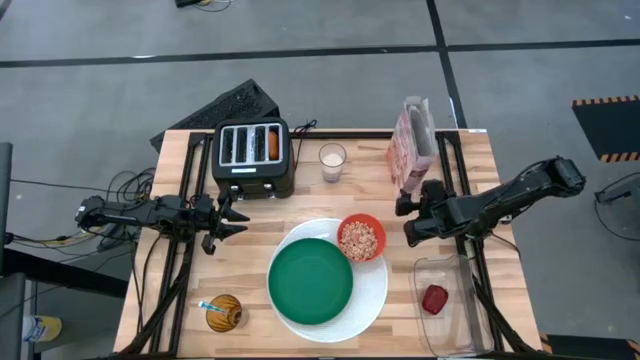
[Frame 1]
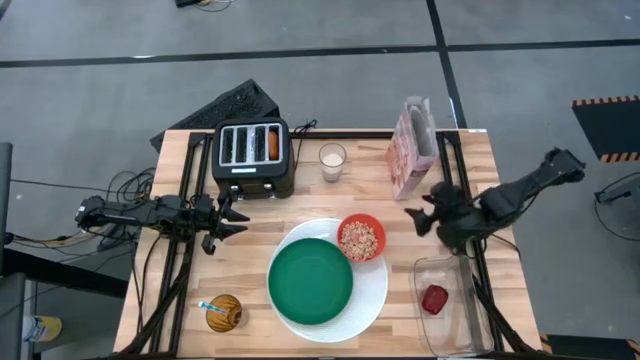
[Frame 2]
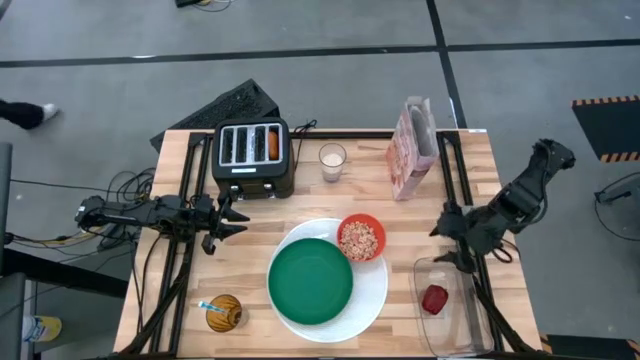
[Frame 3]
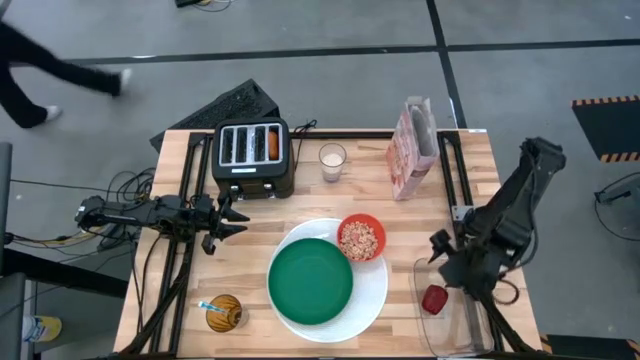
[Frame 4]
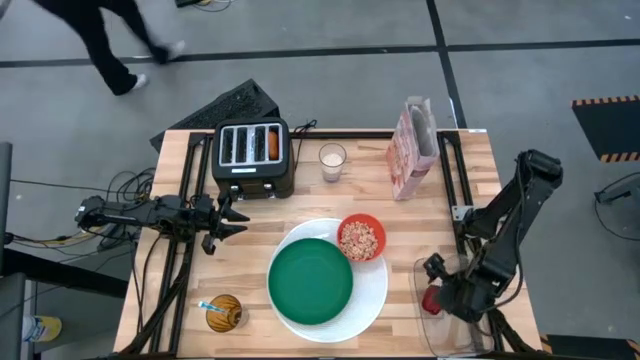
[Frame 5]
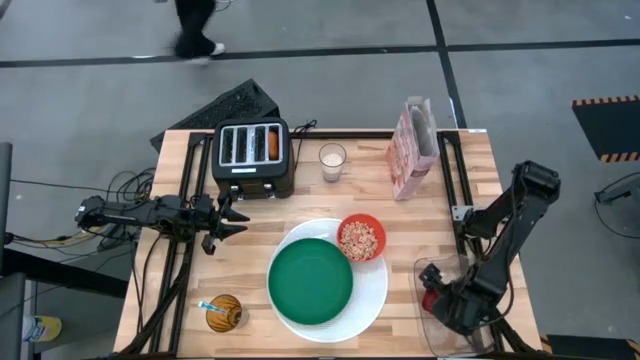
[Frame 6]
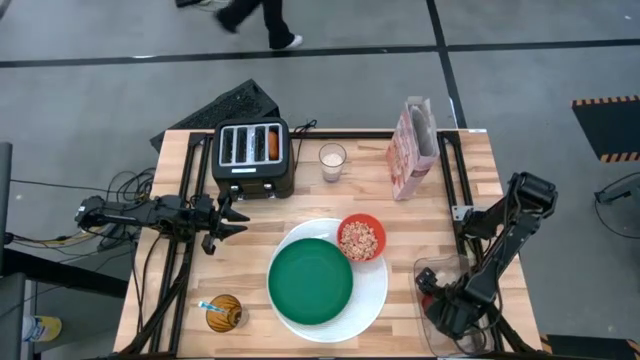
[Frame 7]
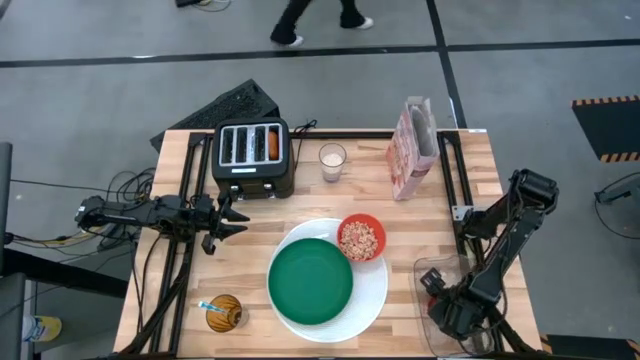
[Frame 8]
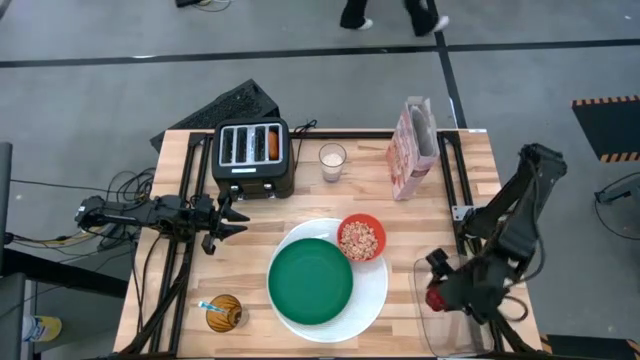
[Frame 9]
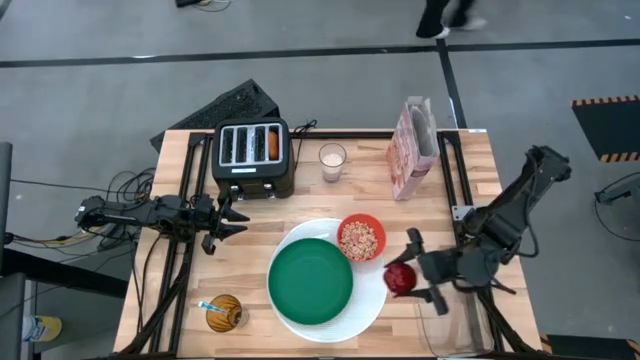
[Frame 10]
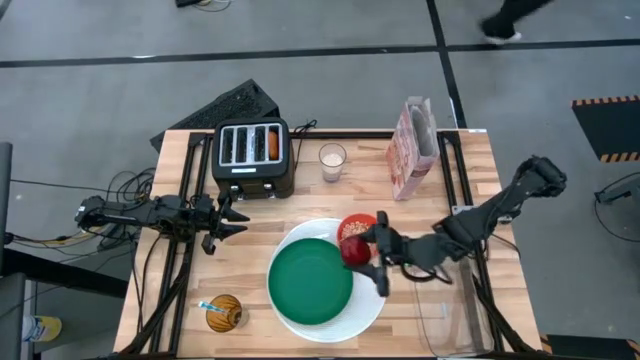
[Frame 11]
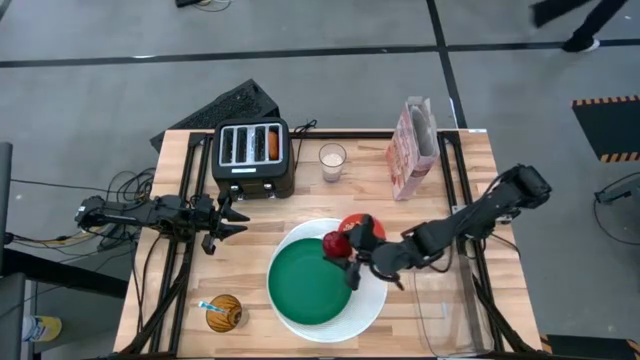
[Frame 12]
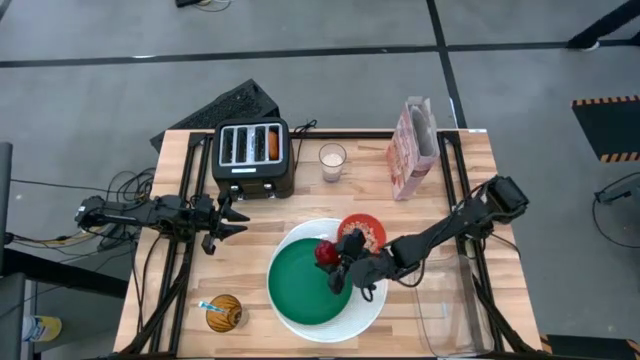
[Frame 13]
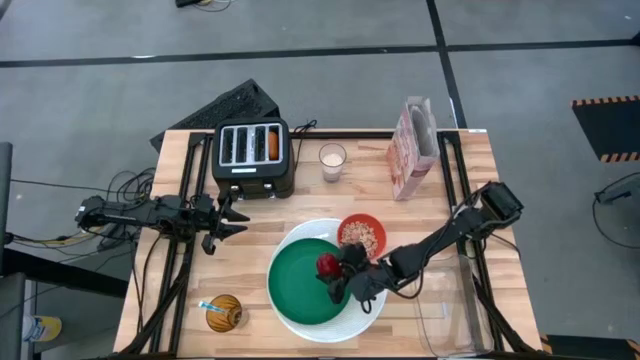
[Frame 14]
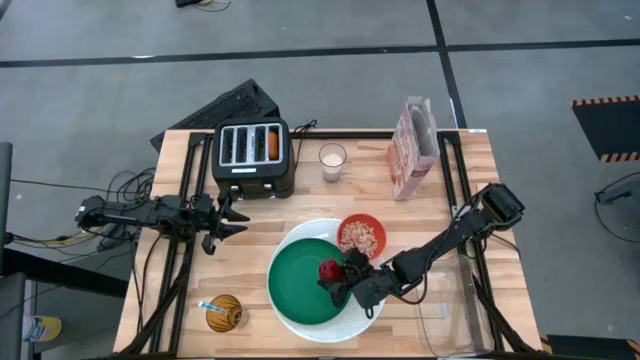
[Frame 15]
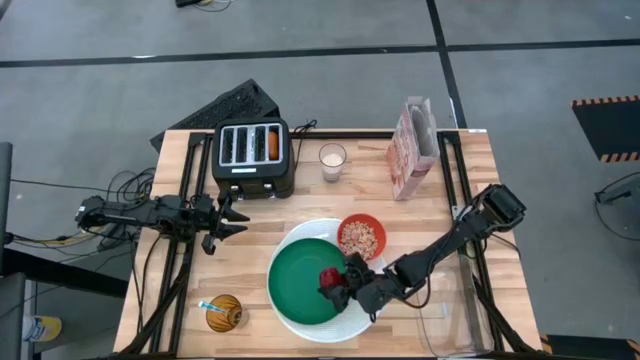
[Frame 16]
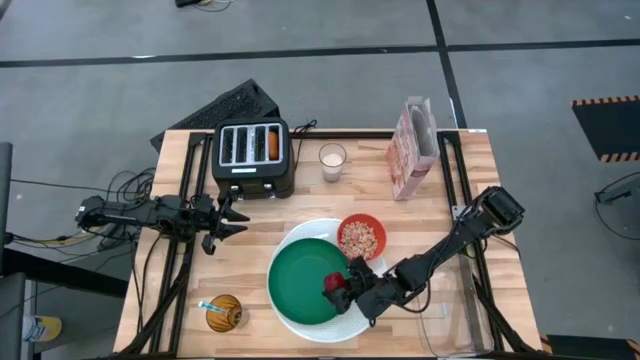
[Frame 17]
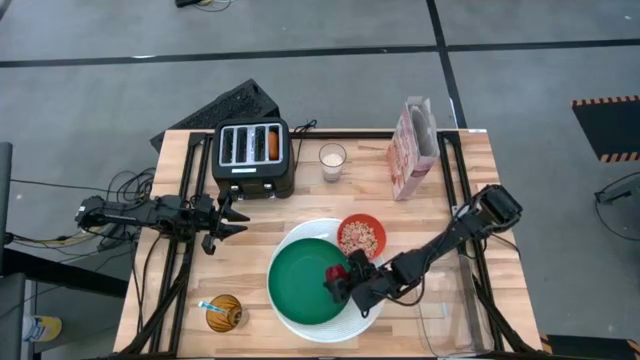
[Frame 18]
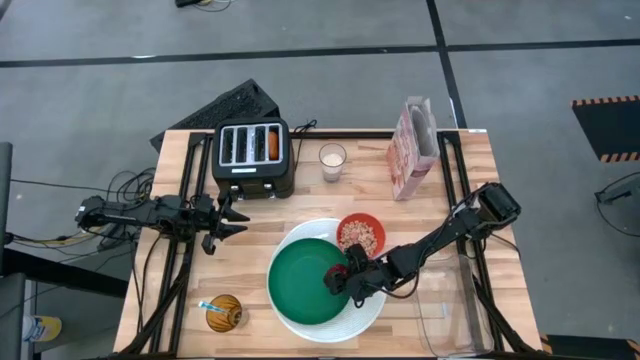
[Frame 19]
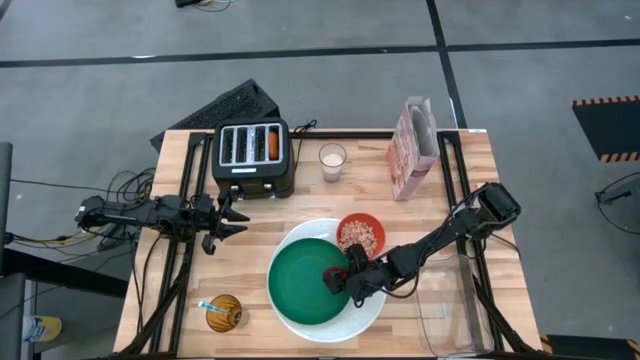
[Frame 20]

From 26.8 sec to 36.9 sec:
Task: Arrange a breakfast setting
Put the red apple into the green plate

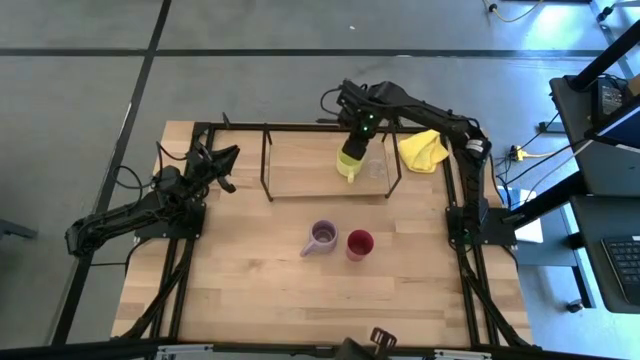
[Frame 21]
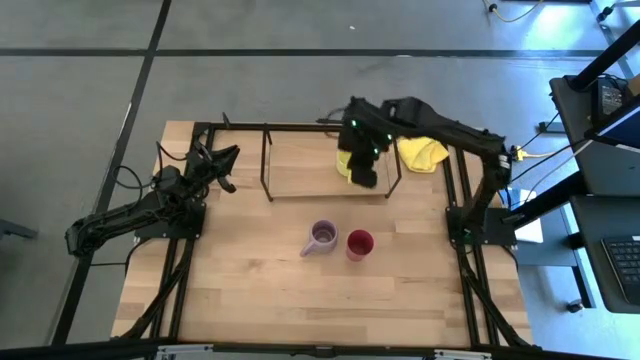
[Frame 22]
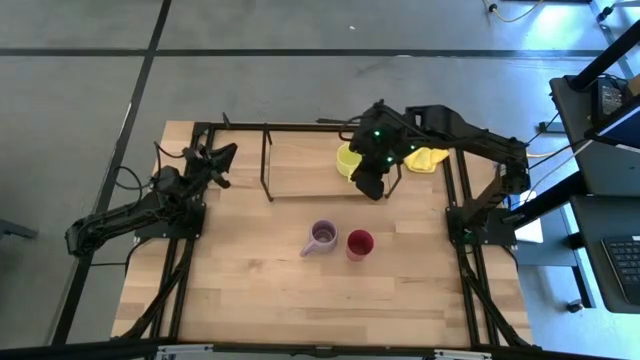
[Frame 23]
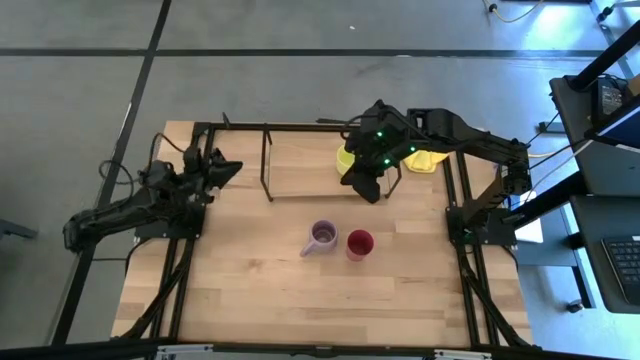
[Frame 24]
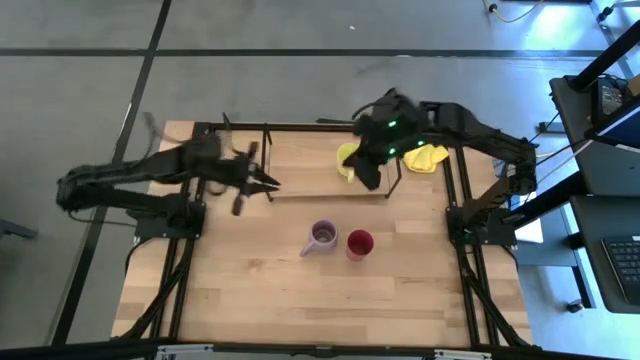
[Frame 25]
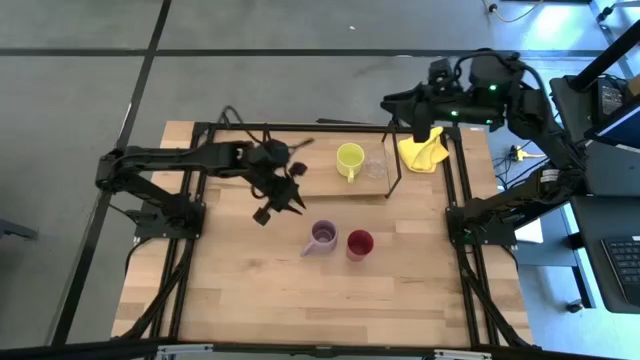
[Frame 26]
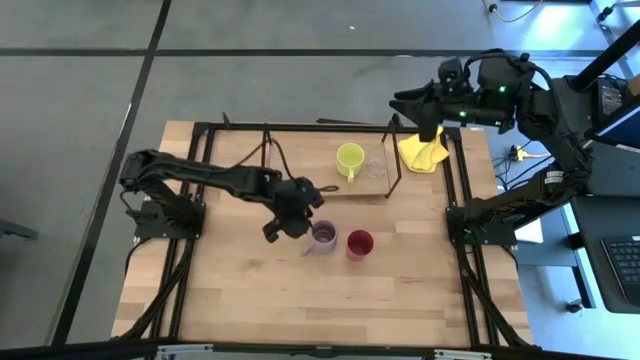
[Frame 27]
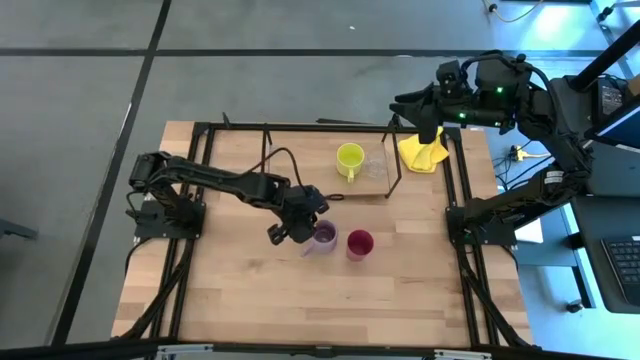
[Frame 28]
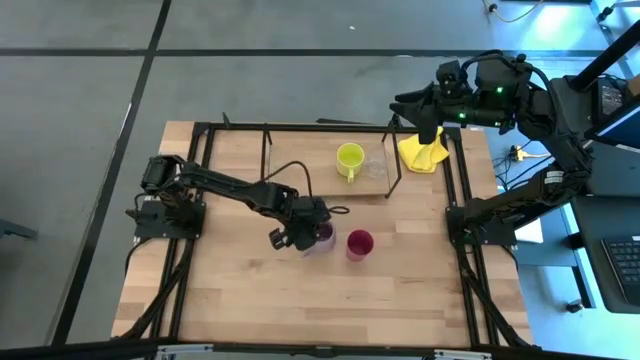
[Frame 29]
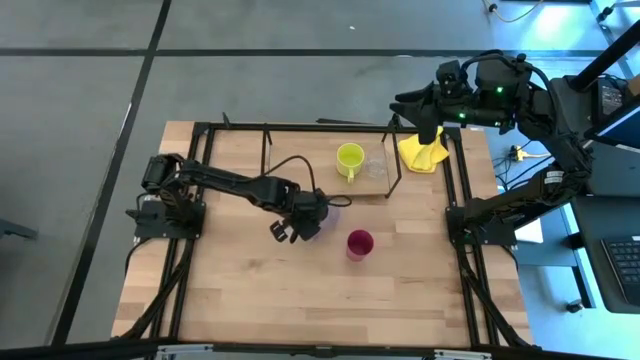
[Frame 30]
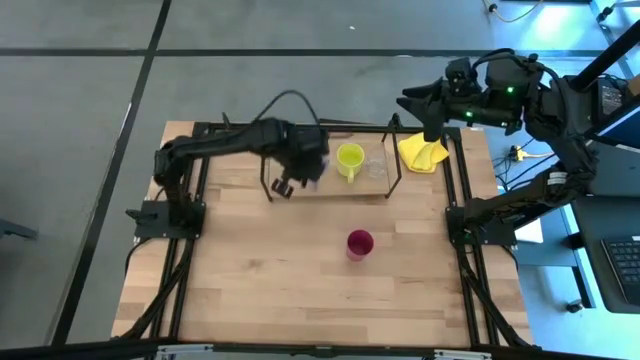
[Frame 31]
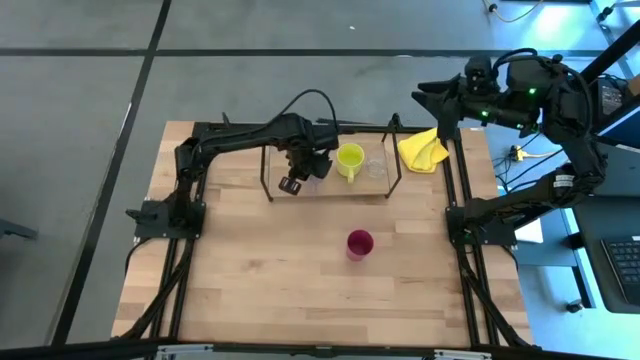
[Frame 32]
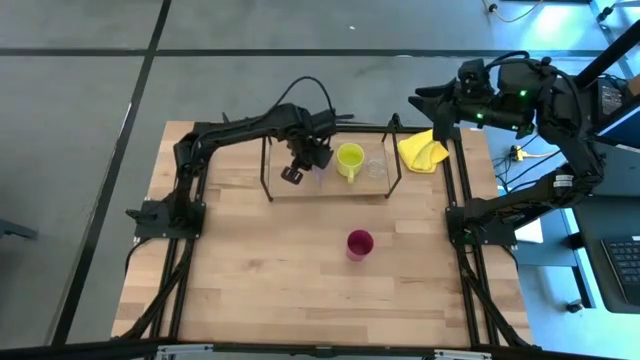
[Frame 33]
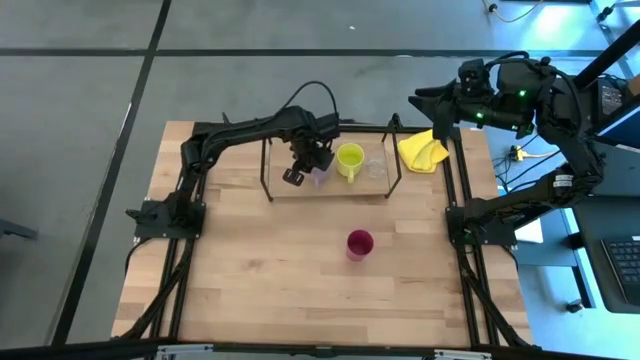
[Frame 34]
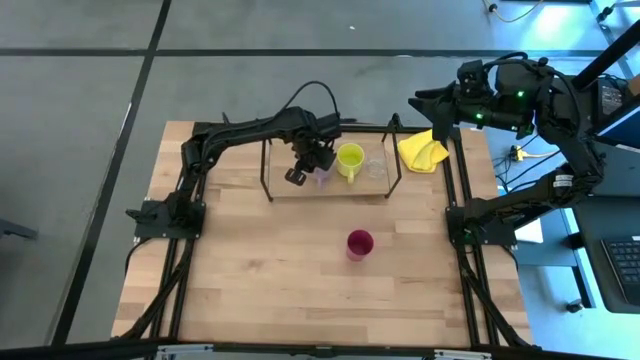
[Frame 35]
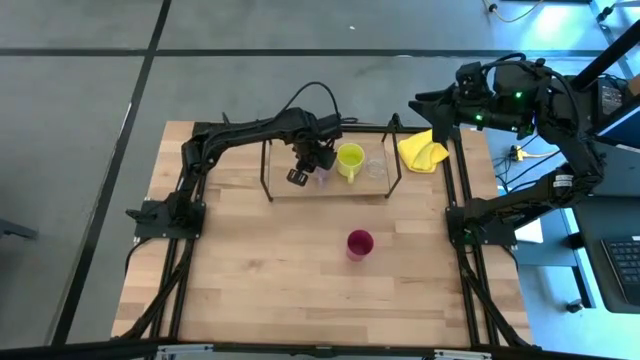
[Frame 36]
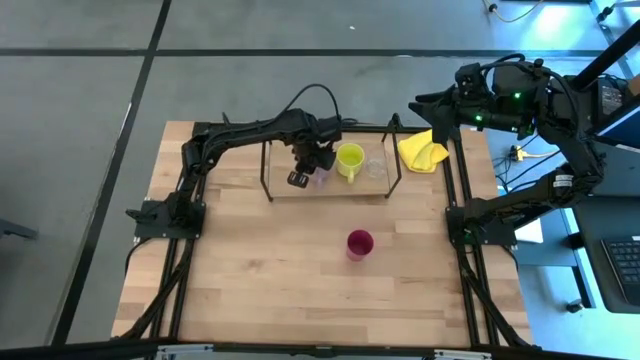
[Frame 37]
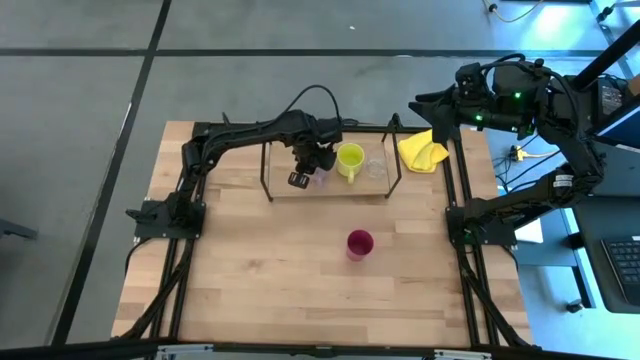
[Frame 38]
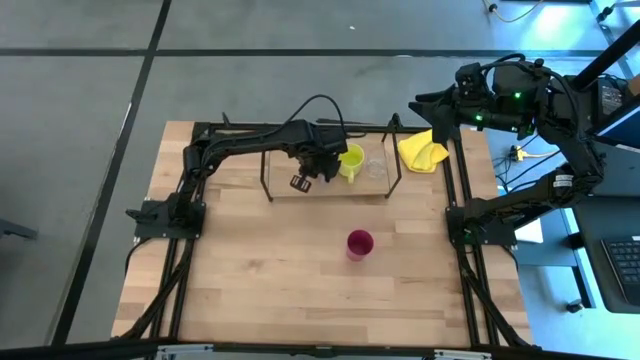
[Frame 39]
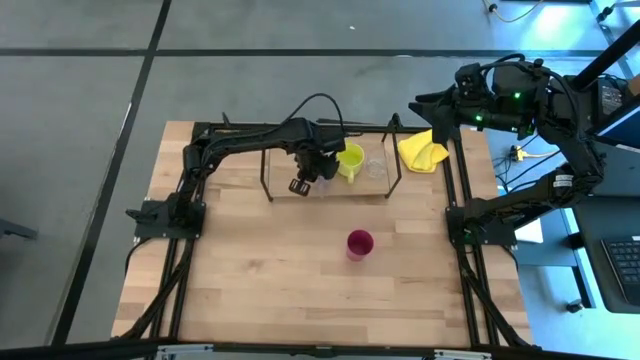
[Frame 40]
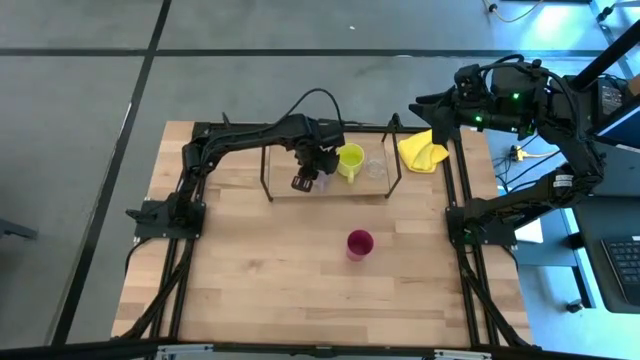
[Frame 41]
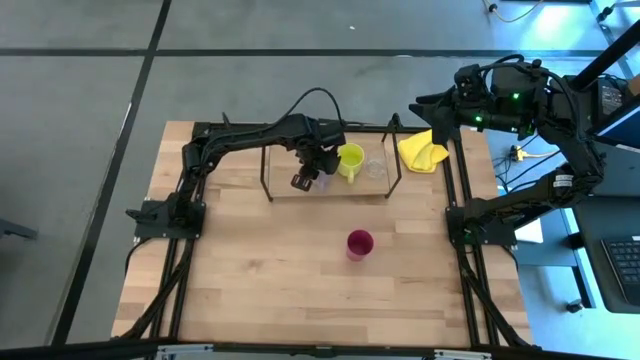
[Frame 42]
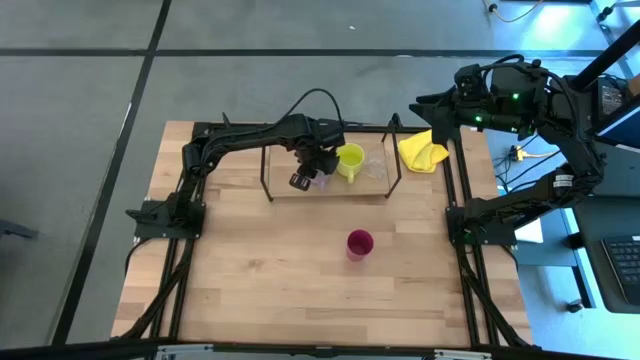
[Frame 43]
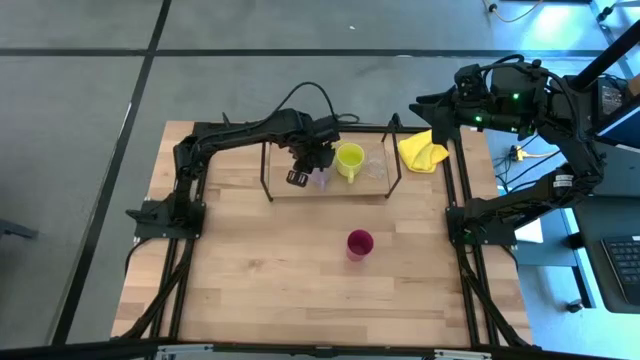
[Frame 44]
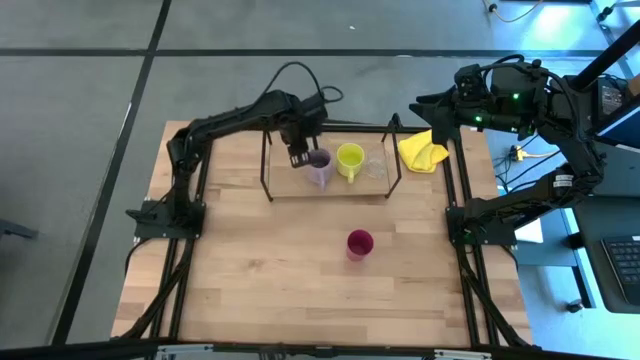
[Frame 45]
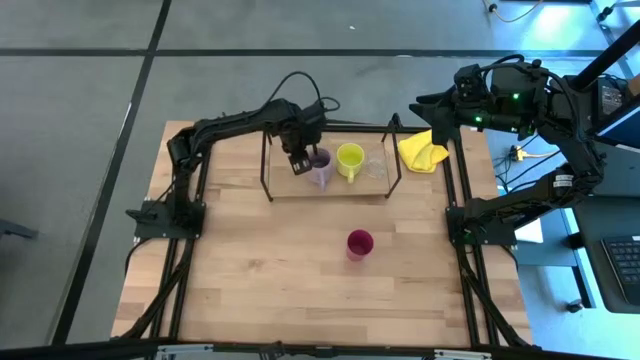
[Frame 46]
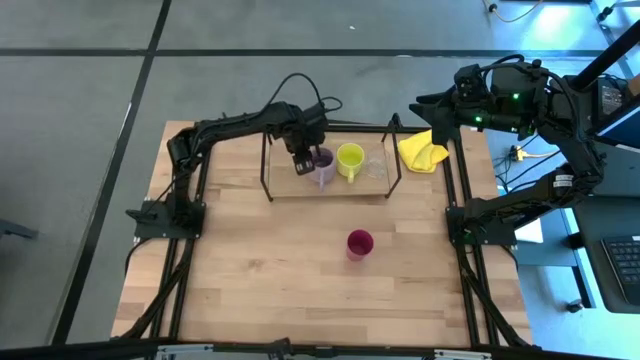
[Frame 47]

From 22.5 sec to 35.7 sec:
Task: Stack small to large cups/mugs on shelf
Put the purple cup on the shelf
